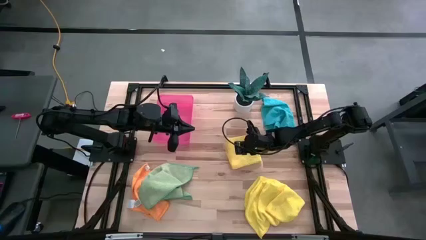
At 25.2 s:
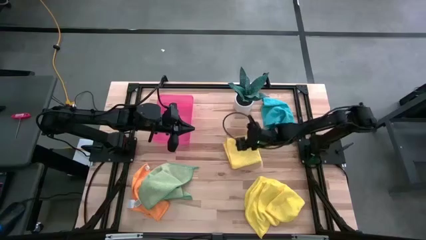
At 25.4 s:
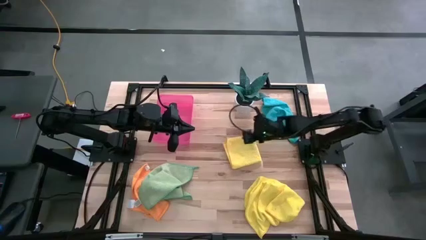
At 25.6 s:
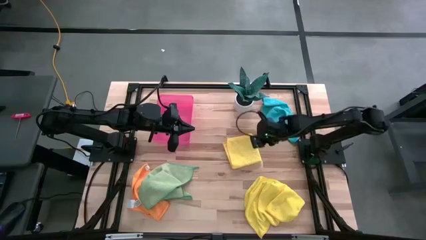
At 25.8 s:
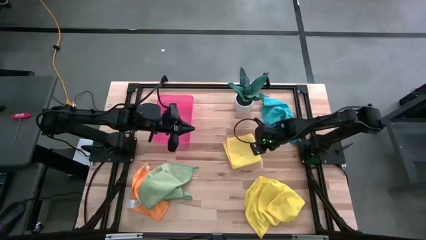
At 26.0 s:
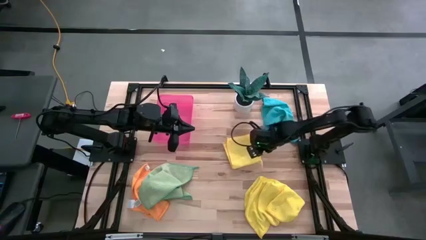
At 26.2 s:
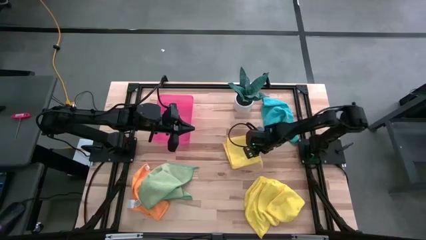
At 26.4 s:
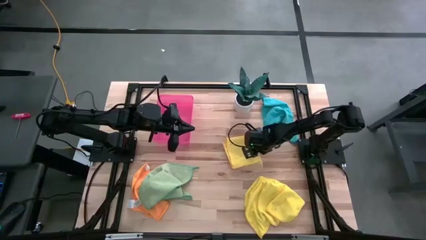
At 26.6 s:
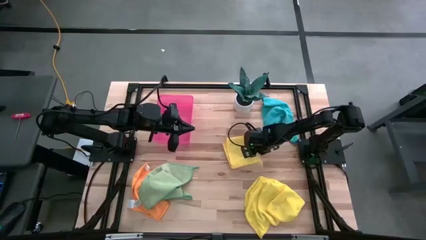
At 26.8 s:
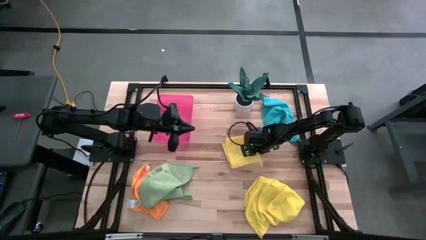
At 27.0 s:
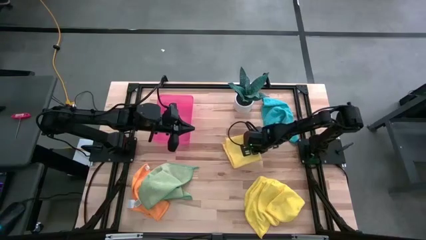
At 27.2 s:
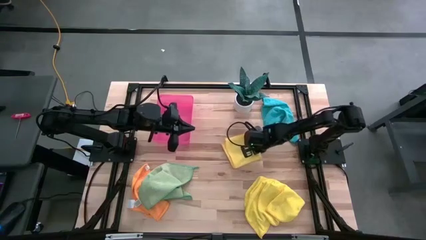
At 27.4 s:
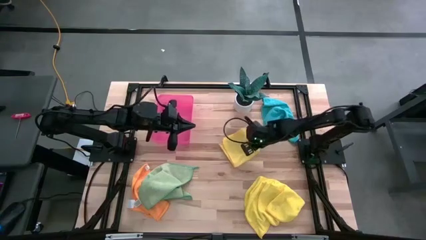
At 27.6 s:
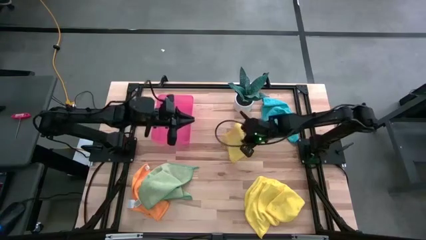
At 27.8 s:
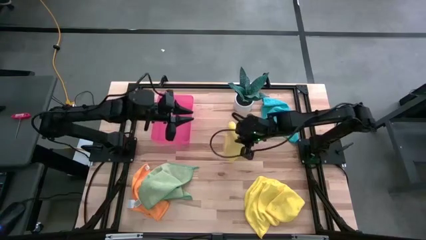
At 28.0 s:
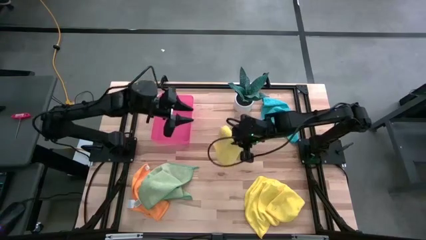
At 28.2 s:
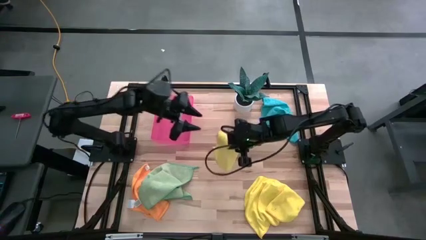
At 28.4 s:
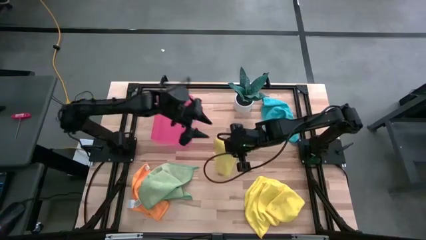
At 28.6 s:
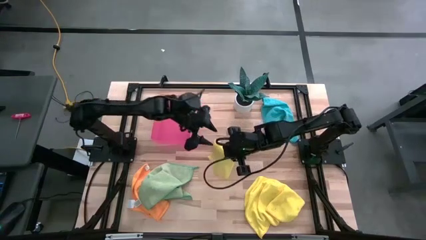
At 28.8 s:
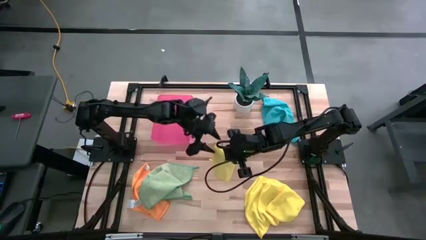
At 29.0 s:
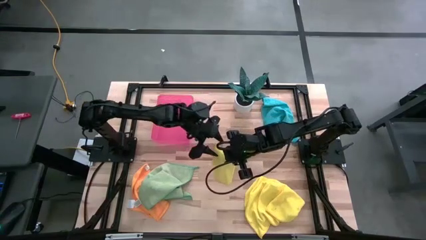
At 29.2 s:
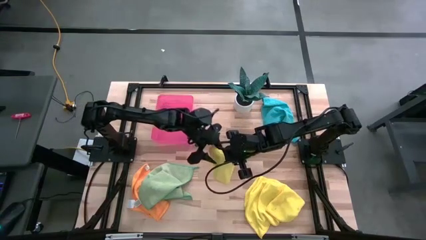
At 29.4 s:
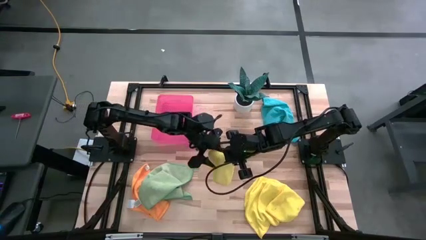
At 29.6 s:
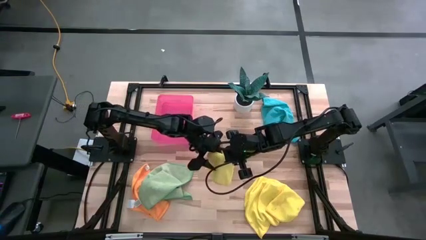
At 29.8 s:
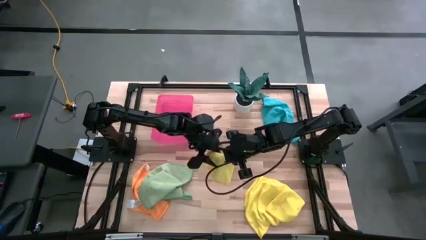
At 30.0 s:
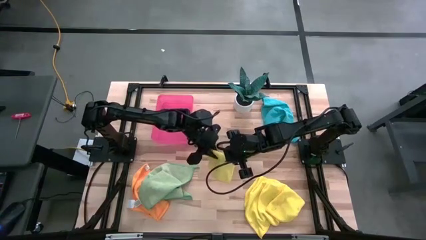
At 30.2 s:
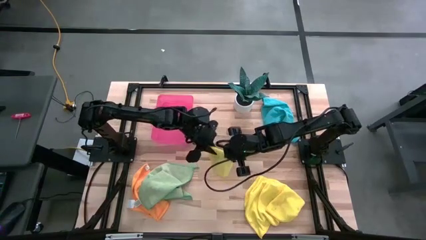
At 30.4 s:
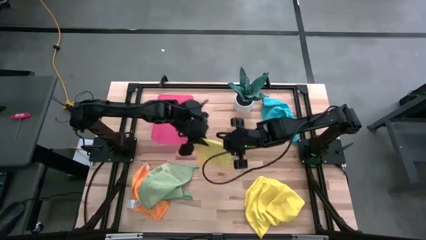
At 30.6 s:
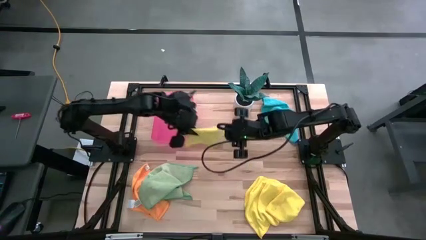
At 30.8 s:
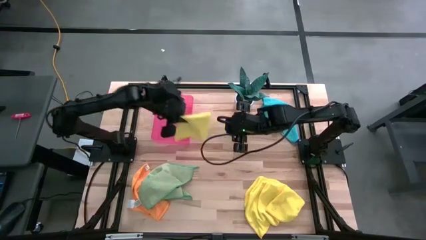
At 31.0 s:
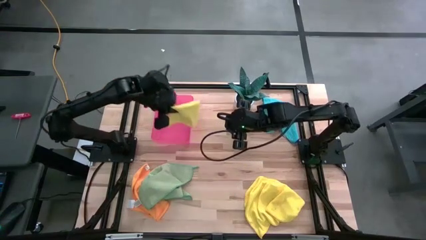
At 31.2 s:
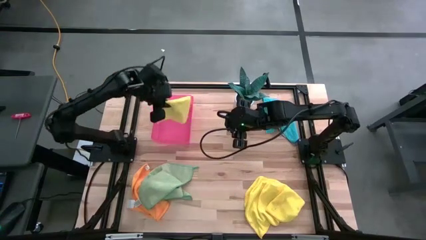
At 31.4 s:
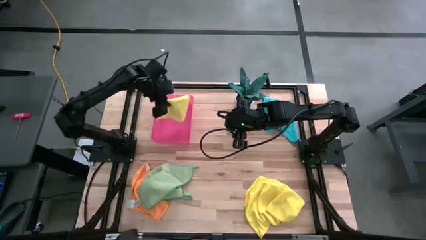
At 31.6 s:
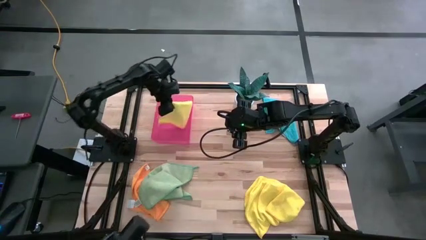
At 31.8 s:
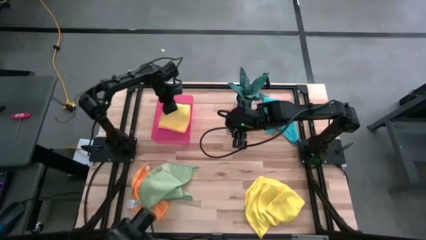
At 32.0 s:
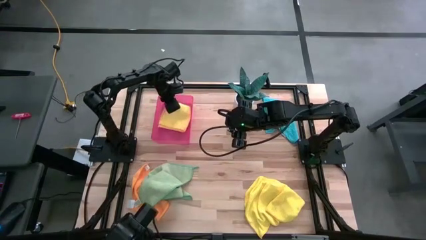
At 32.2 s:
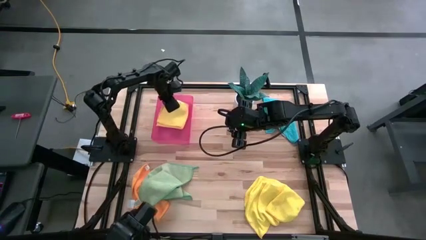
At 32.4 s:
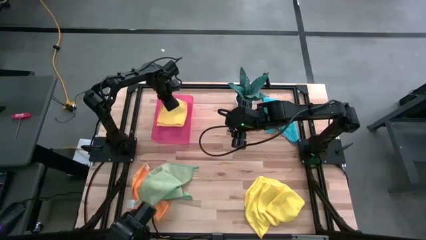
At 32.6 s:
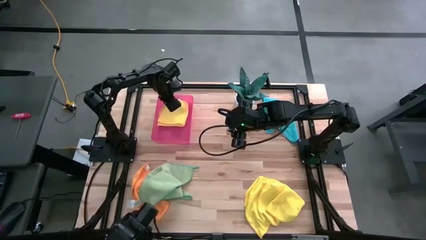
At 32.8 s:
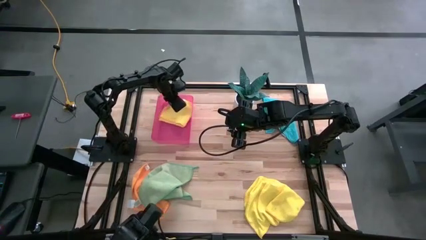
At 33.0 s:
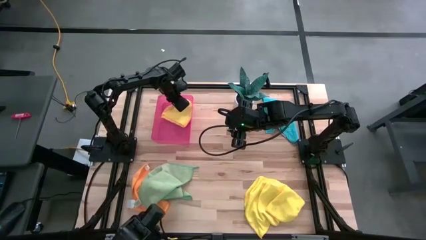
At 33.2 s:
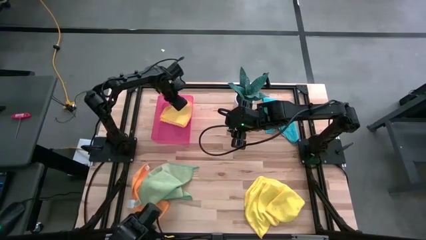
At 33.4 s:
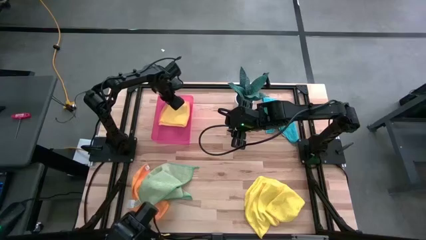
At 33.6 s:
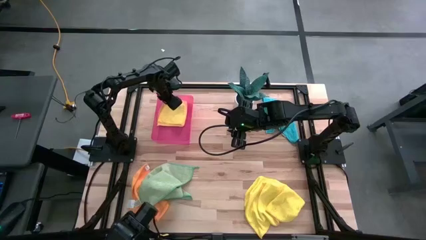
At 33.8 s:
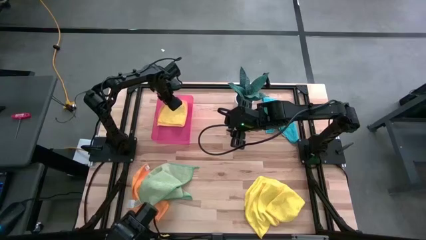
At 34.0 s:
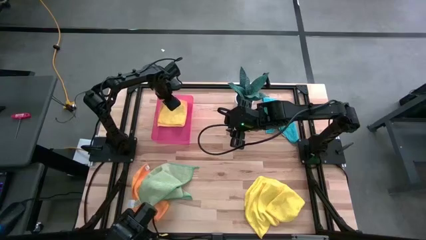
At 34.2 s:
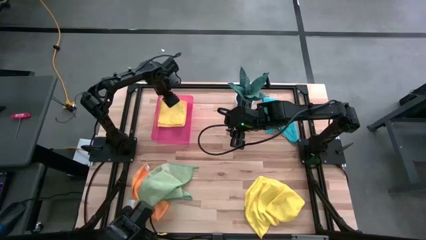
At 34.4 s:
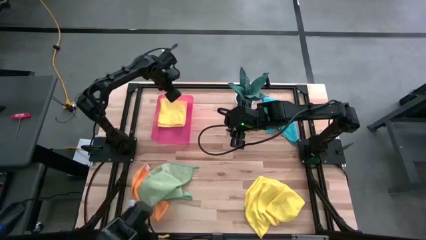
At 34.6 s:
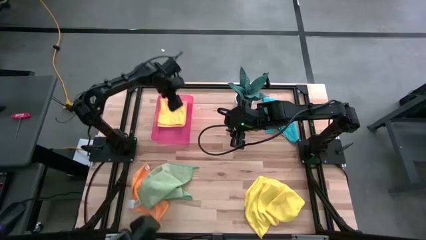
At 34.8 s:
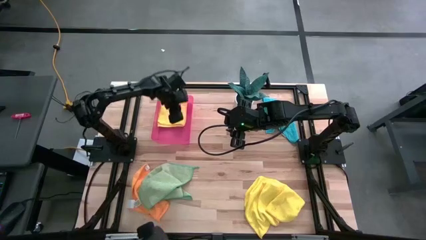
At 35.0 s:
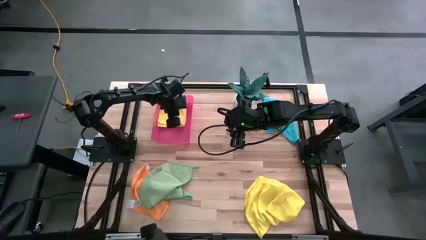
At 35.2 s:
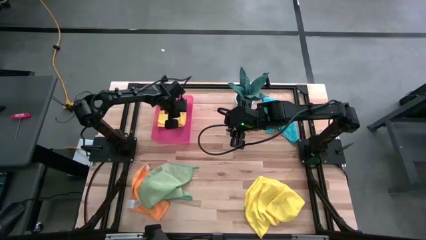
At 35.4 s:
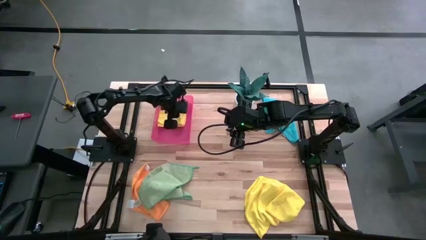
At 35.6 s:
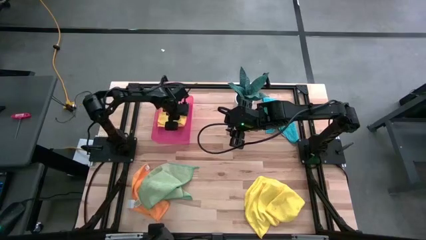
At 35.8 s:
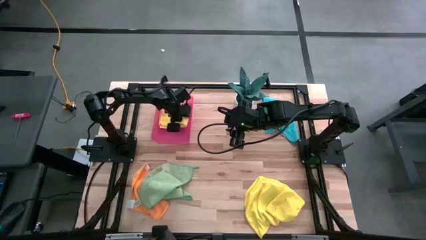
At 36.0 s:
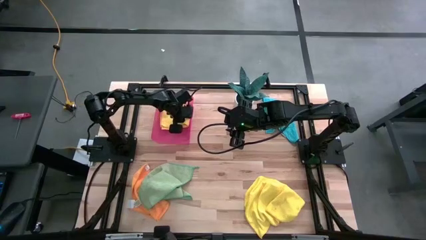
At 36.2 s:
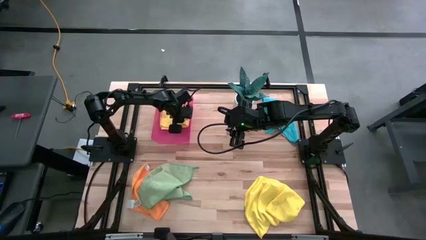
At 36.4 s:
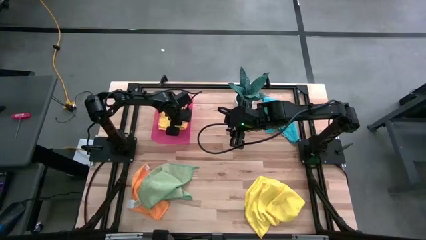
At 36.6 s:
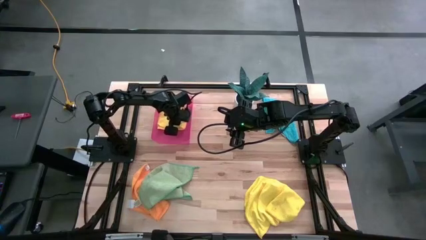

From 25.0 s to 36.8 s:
Task: Fold microfiber towels
Put the folded yellow microfiber towel into the pink bin

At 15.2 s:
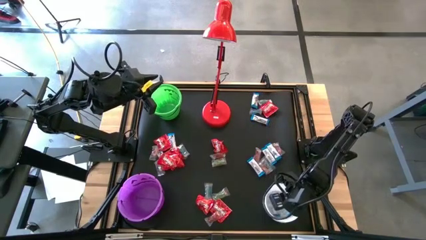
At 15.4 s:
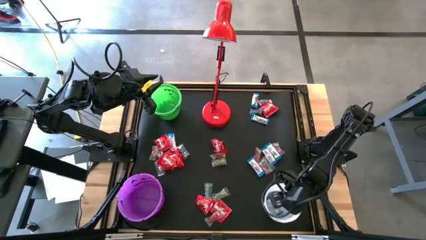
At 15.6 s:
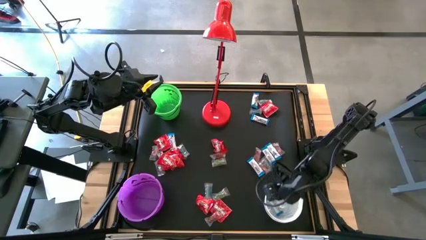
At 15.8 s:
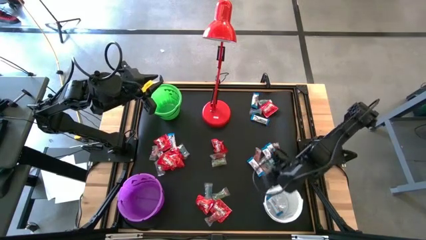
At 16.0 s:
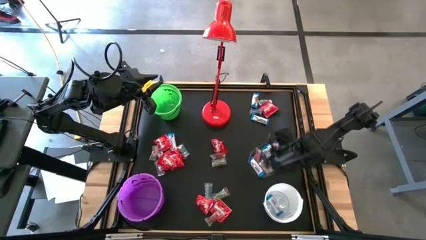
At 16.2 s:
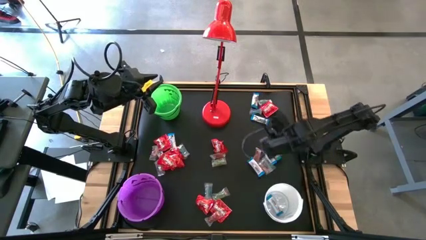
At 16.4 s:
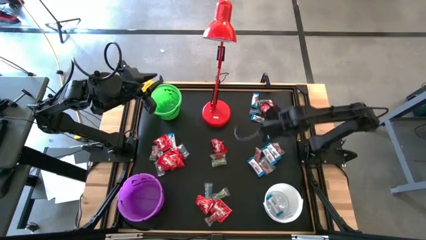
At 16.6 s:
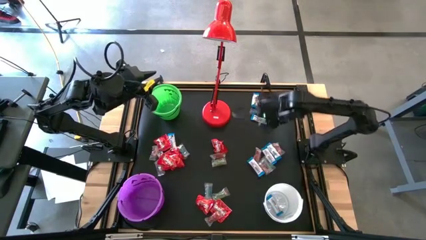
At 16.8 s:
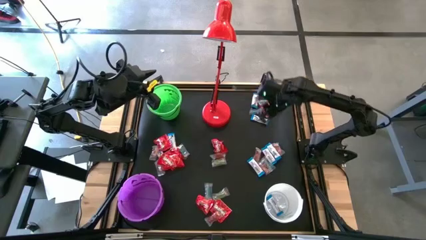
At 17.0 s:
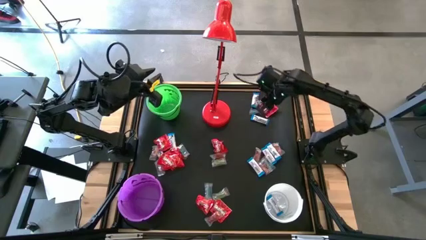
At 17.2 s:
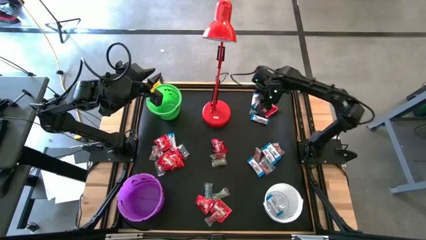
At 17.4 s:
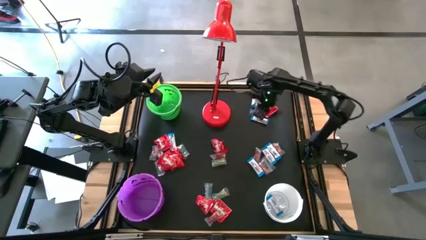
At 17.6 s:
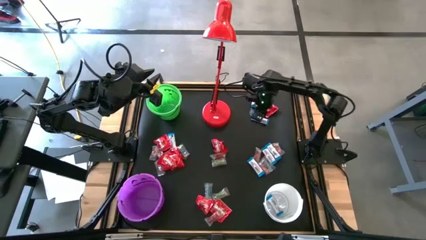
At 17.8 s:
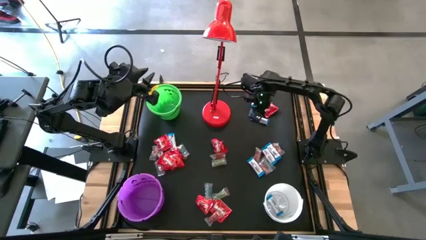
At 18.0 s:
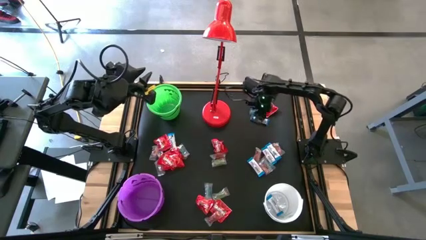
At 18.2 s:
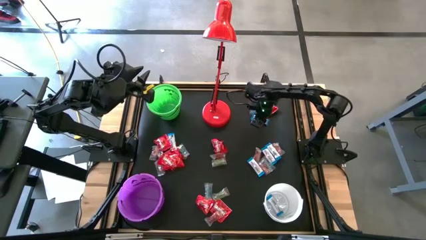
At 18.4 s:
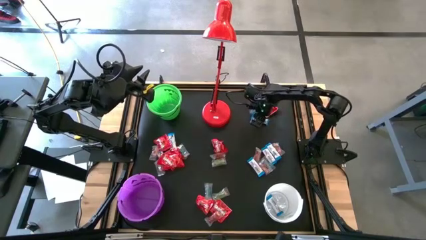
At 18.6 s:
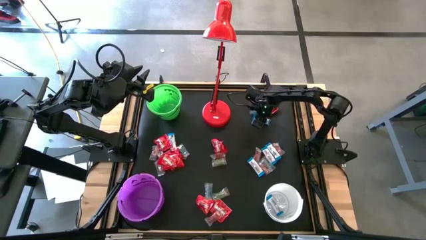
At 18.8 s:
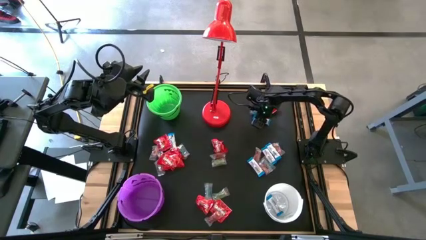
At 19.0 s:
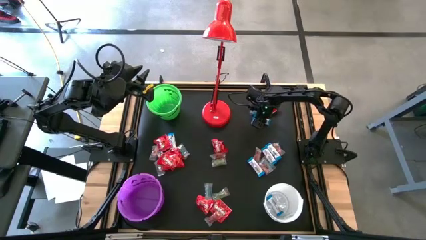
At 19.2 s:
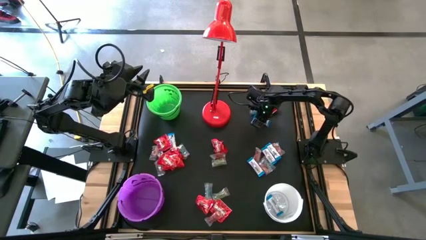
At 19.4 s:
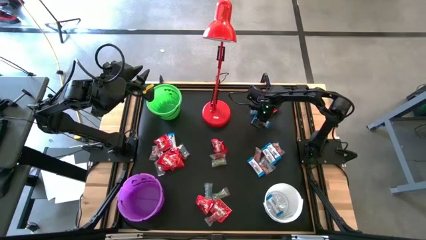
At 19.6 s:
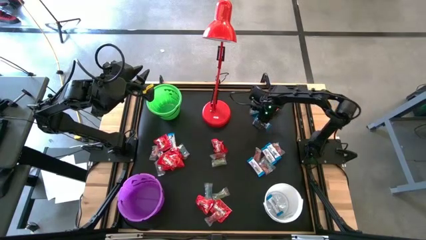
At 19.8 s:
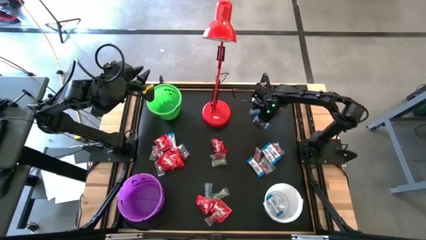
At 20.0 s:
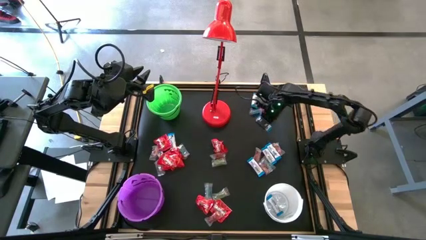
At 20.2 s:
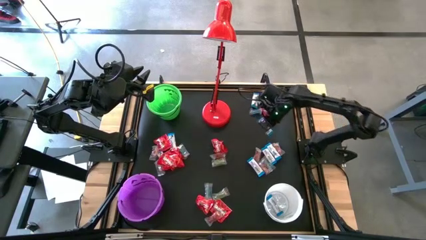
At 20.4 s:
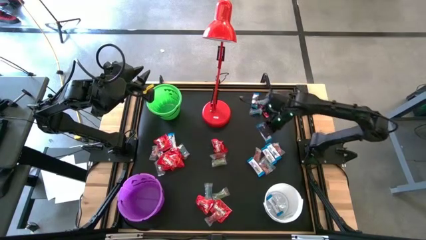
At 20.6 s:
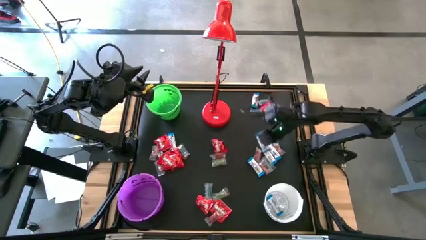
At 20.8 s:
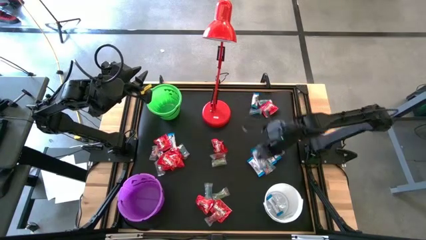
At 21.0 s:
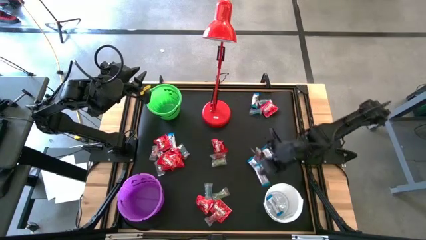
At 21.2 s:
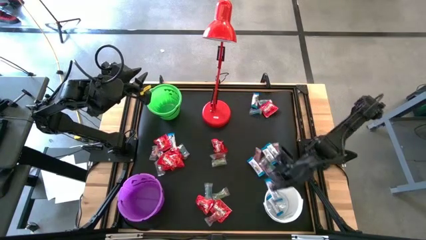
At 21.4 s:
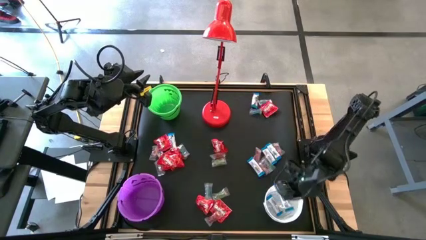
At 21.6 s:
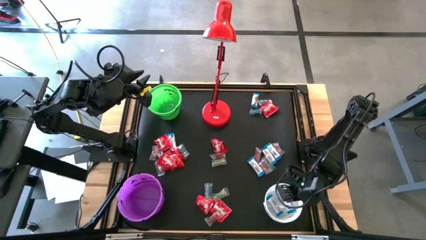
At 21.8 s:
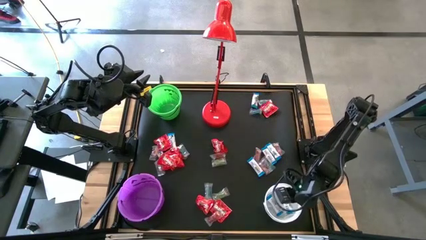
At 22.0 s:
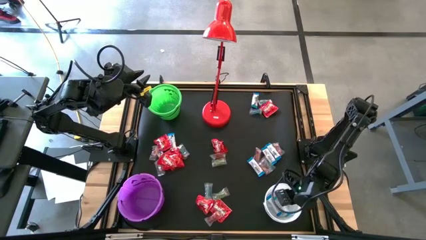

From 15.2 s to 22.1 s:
Task: Sort candy
Put the white chocolate into the white bucket
